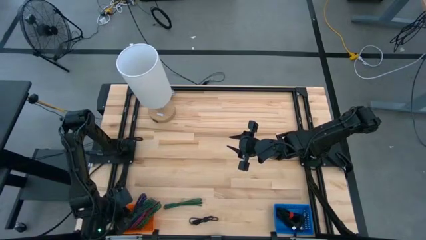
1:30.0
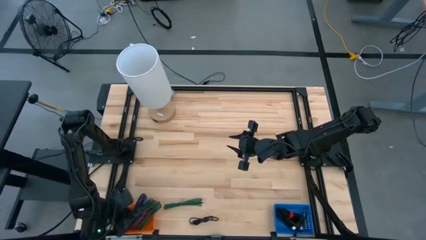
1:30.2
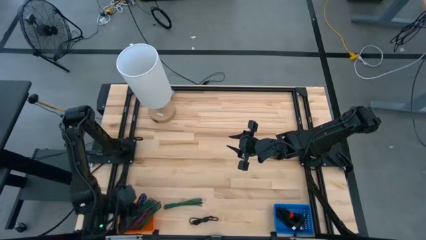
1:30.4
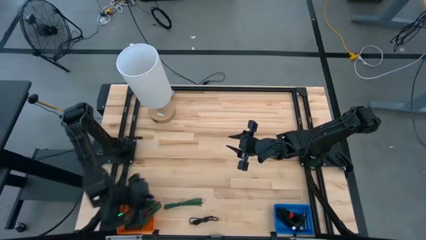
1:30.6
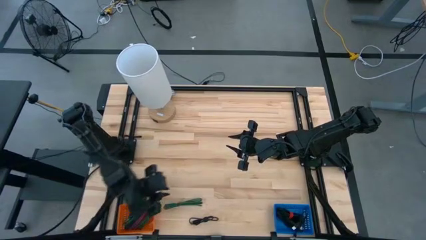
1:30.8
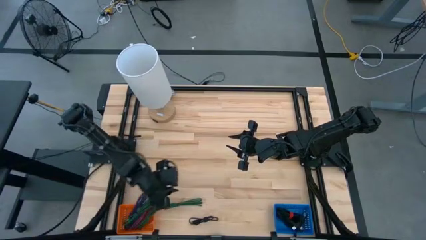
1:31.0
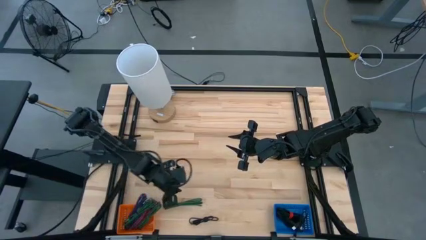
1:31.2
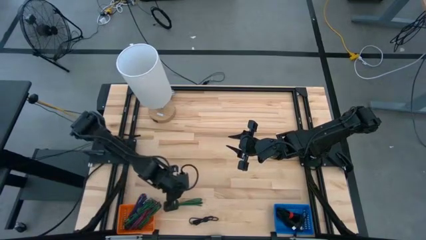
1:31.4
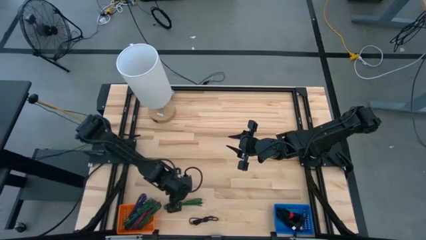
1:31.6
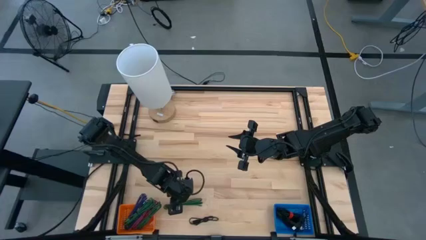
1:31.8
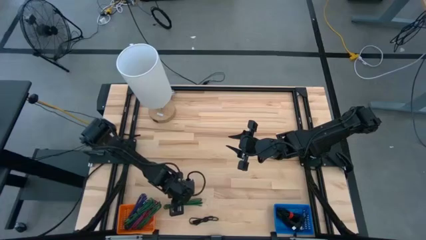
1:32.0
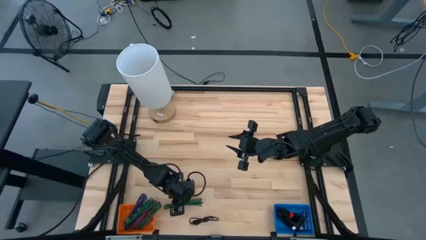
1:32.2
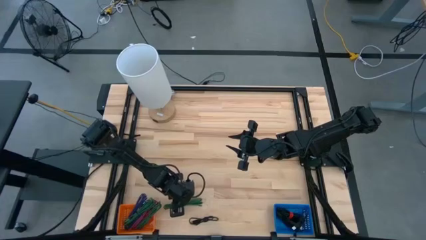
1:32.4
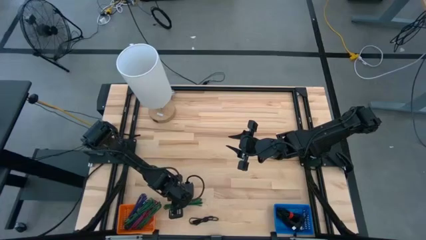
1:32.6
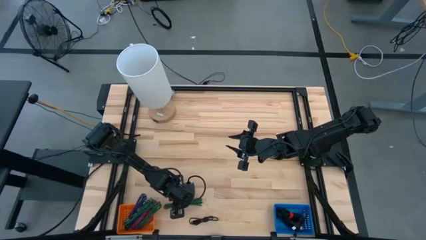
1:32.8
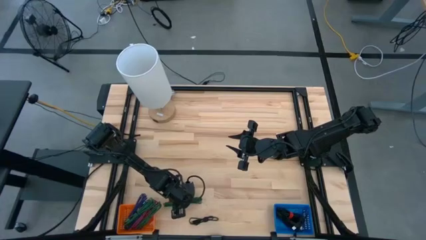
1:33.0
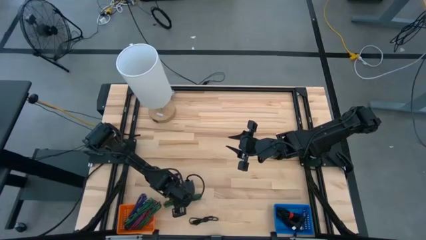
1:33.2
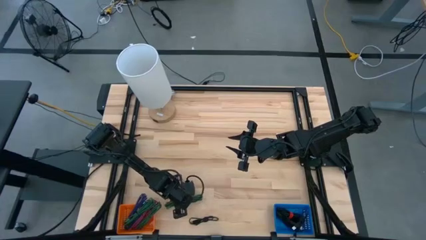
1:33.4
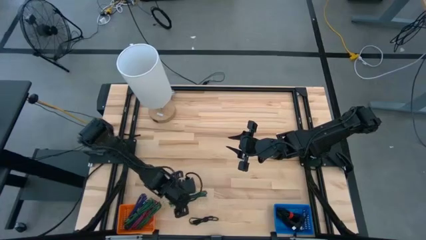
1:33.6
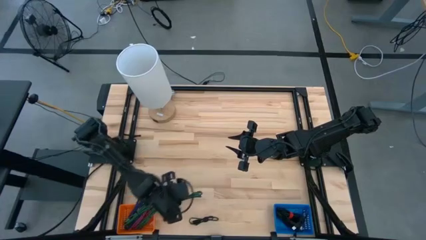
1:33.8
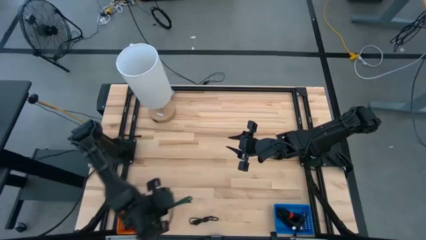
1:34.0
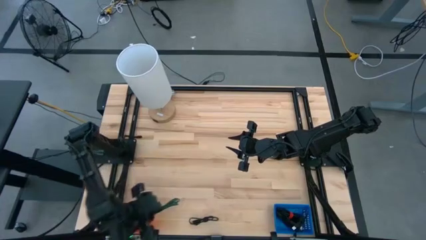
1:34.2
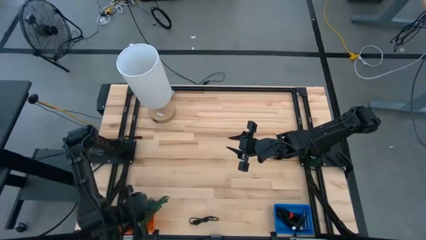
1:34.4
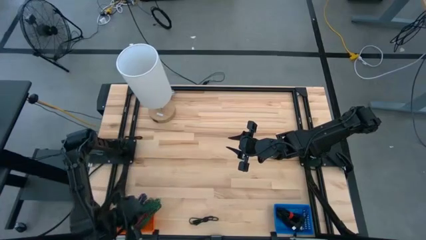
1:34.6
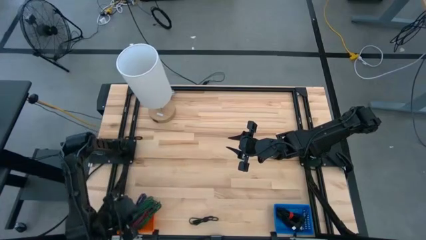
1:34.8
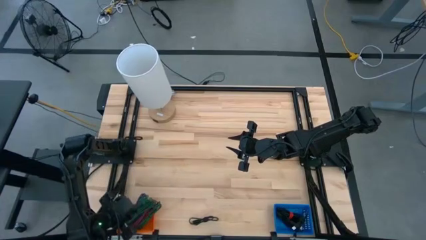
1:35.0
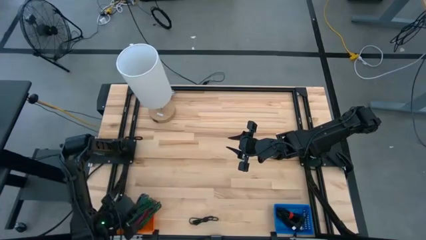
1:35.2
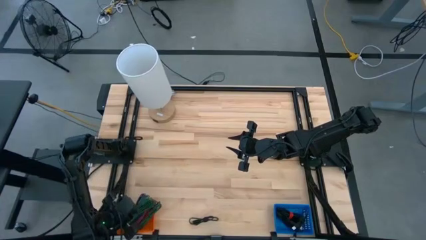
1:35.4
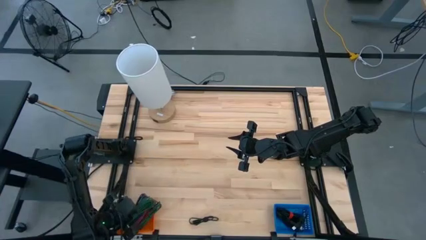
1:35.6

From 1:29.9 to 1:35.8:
Task: Pick & Place USB Port
Put the green patterned charger cable into the orange bin

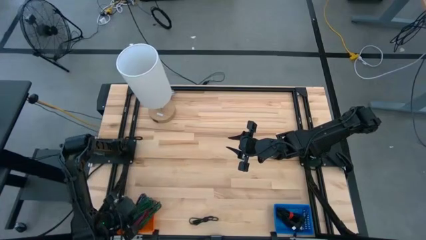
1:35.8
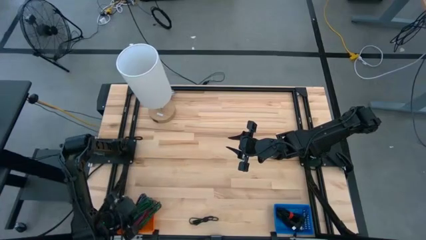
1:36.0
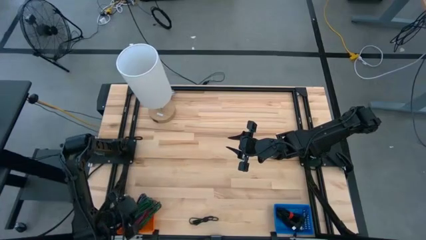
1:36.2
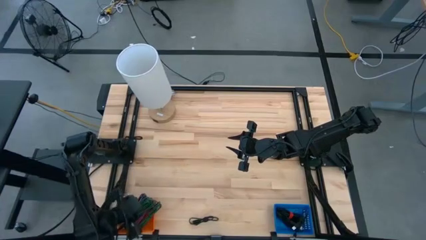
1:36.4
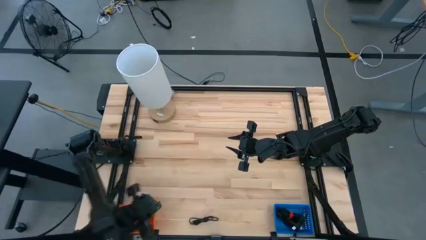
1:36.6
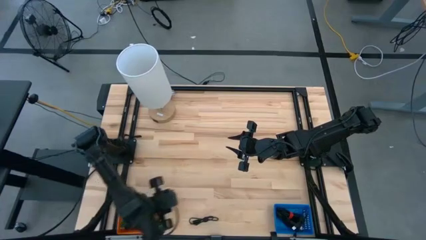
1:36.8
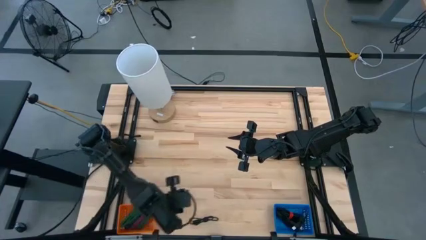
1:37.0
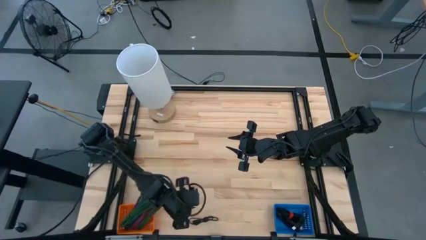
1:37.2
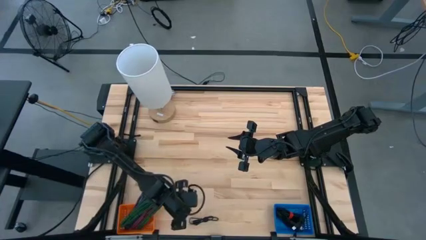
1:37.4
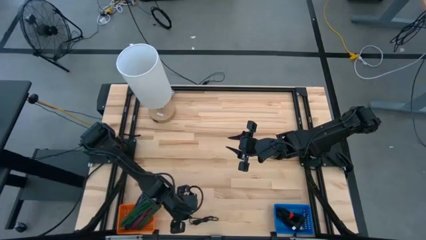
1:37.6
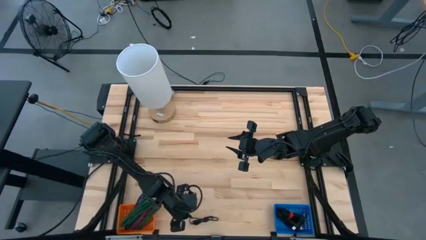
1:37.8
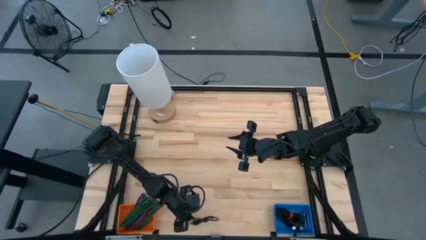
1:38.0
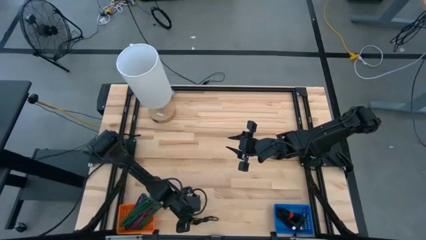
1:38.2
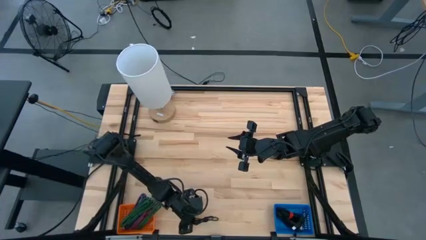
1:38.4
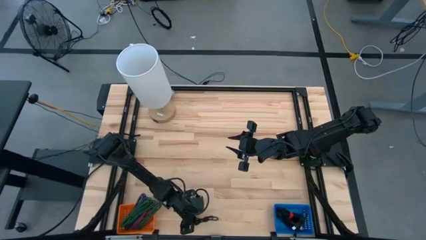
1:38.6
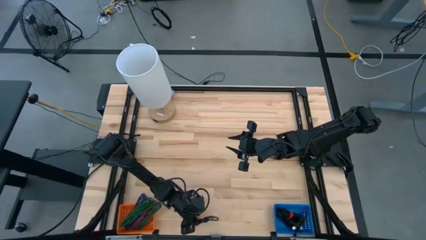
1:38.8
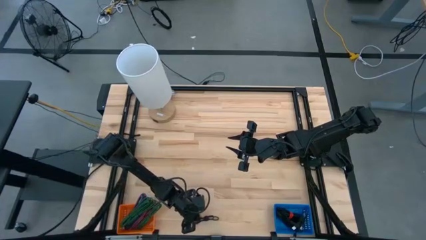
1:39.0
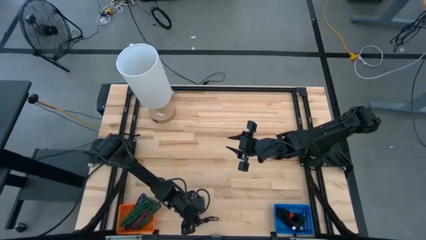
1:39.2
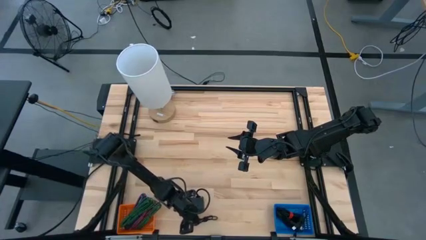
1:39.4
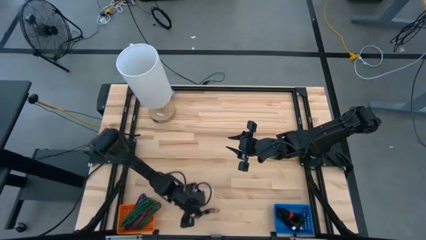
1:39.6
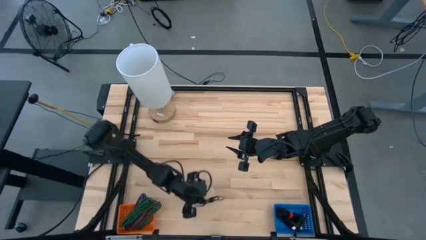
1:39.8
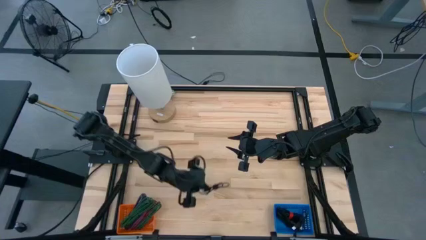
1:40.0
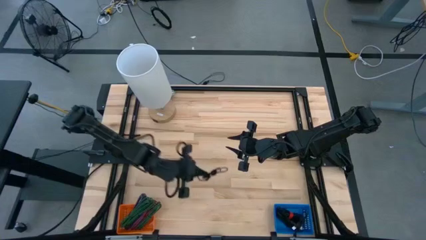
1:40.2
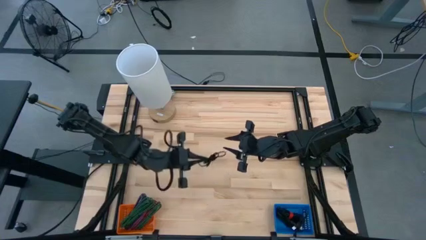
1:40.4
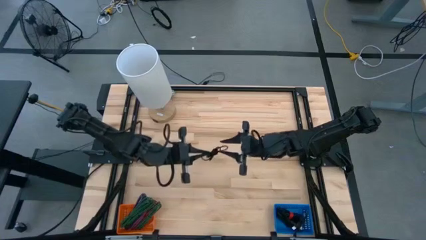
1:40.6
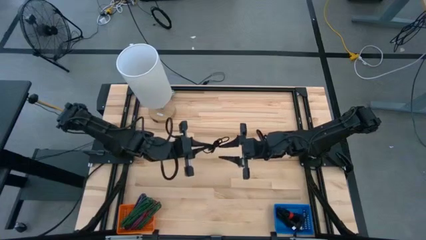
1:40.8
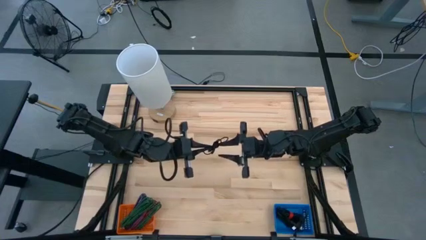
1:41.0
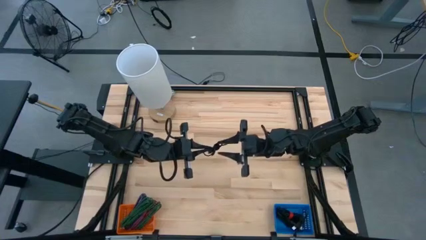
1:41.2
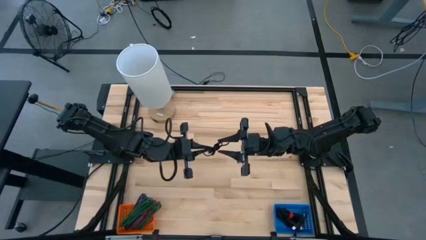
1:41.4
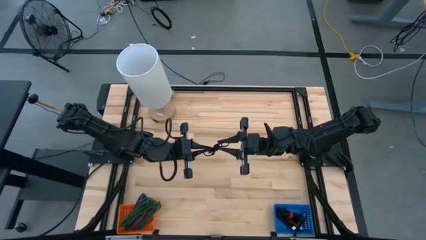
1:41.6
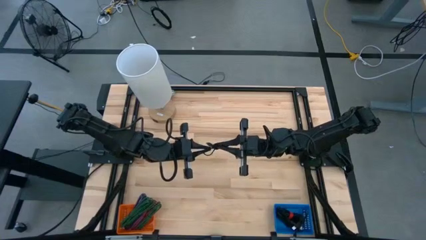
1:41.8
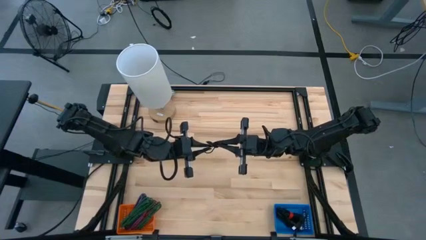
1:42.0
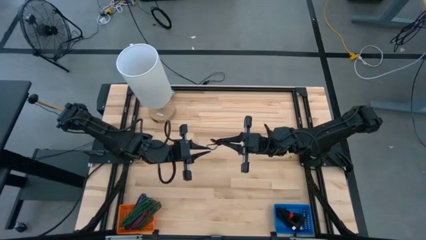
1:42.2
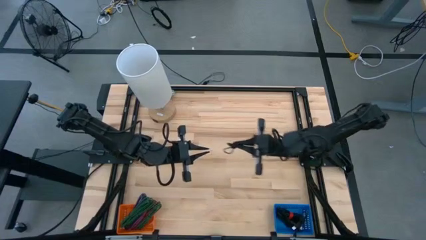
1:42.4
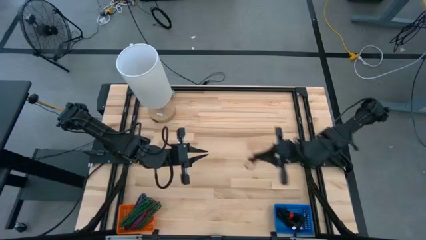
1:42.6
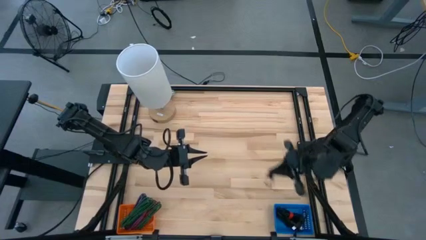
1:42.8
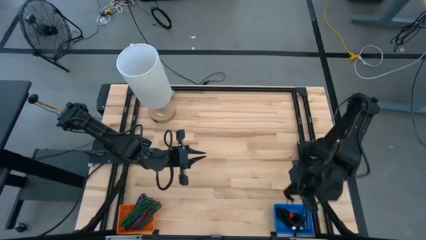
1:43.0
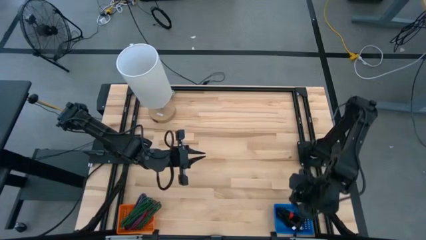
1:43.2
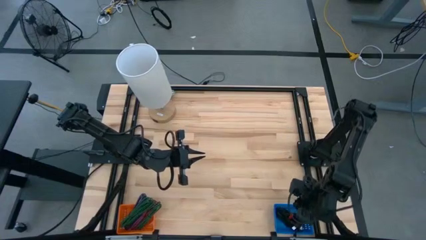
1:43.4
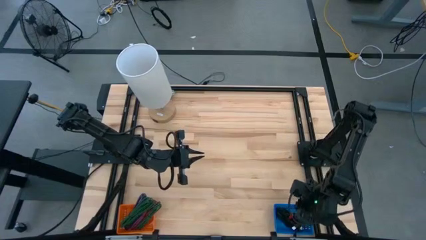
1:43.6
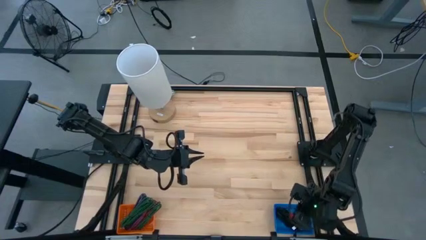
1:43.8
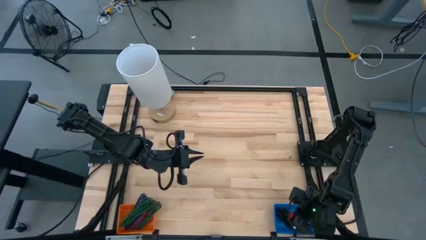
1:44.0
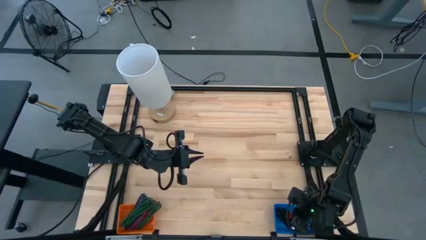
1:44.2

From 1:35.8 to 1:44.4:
Put the black charger cable into the blue bin

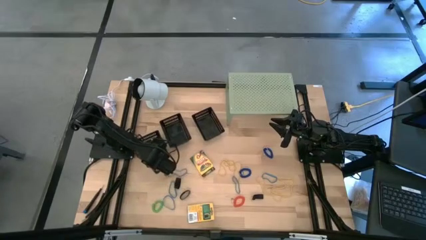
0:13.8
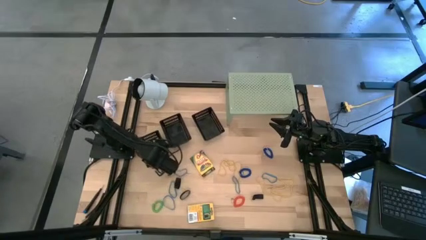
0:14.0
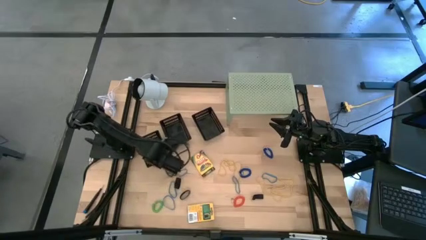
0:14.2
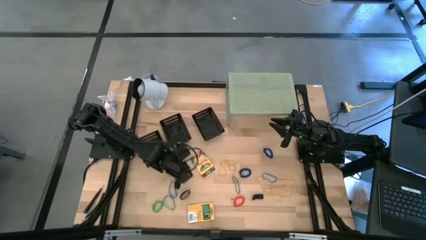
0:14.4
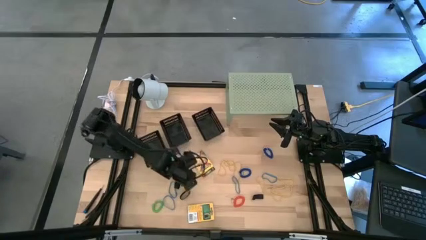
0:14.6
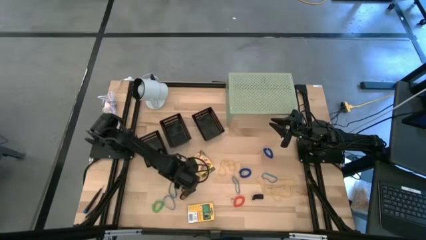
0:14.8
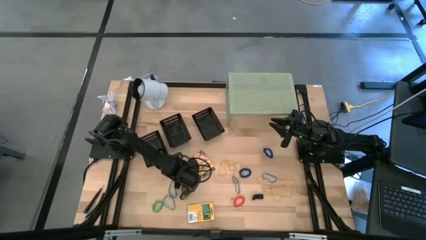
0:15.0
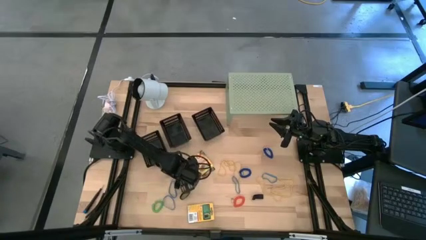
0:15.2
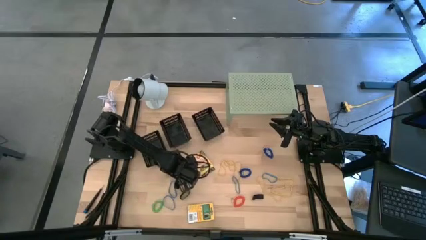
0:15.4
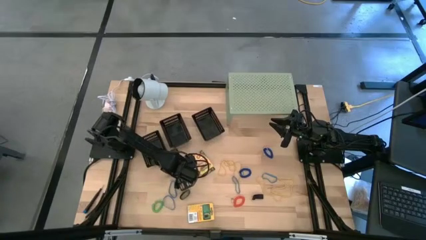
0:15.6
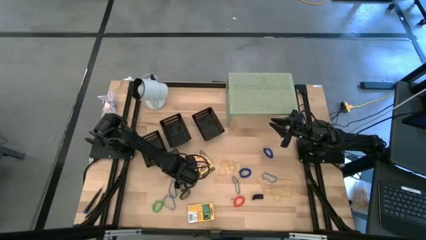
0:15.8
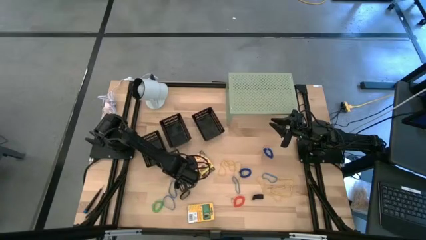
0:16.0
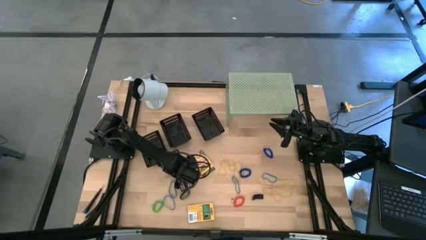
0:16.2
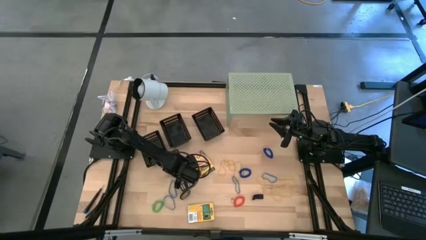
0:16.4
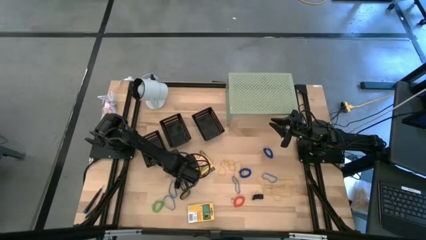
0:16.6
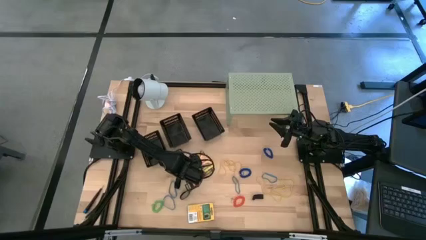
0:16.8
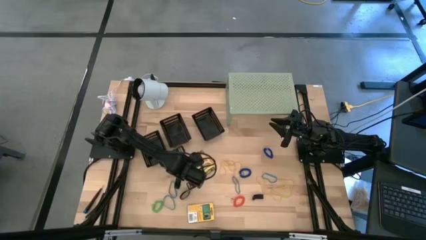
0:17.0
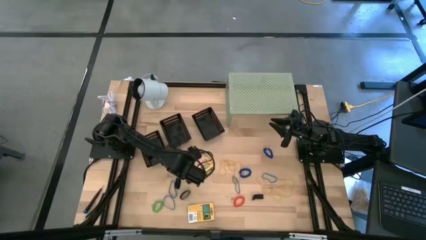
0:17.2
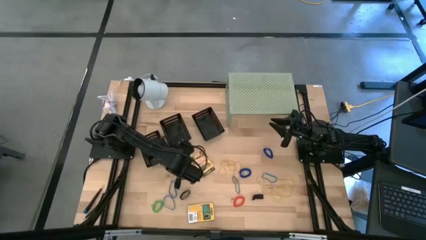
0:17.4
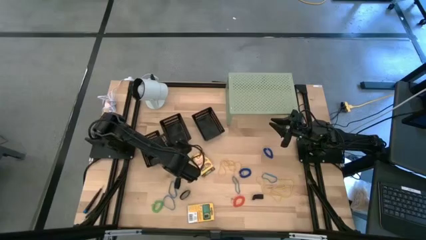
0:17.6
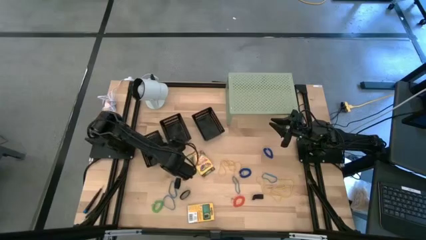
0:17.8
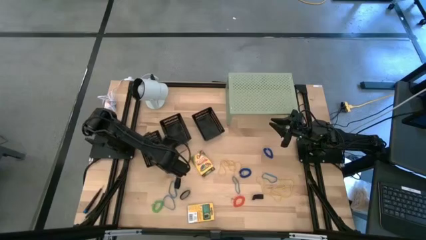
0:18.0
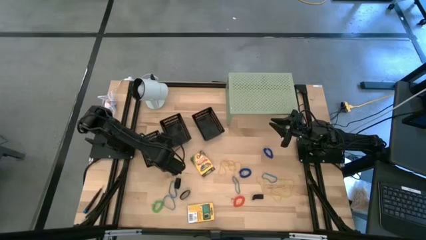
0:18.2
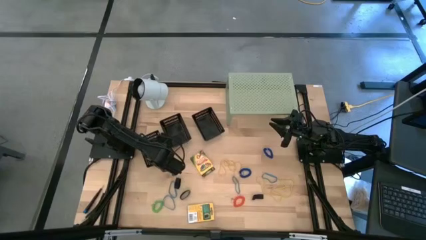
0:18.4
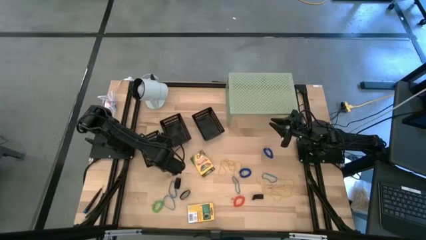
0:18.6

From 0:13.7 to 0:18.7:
Task: Pick & Place Office Desk Supplies
Put the blue rubber band into the left black basket
